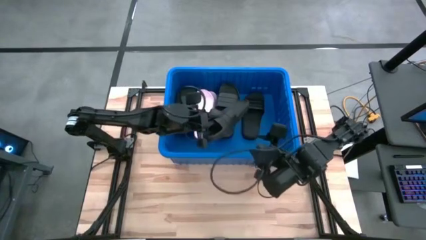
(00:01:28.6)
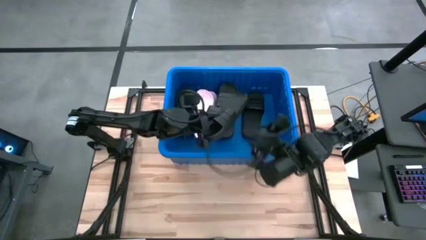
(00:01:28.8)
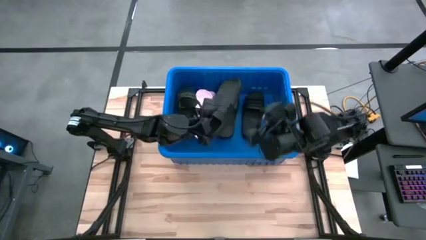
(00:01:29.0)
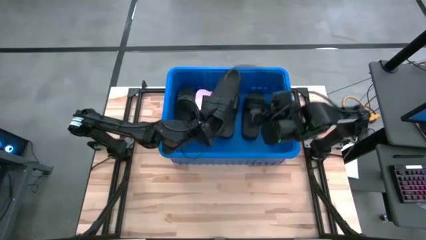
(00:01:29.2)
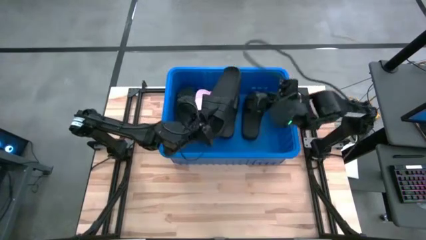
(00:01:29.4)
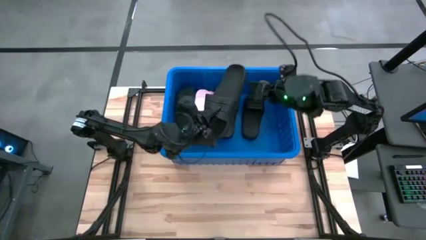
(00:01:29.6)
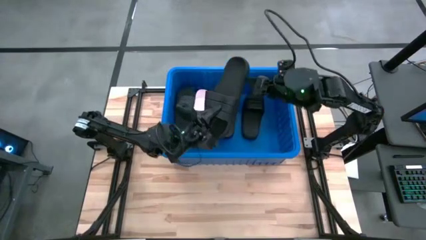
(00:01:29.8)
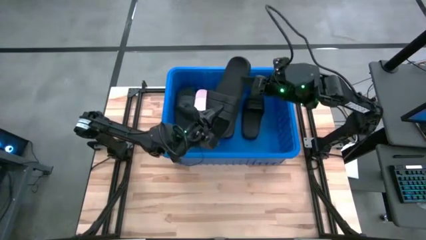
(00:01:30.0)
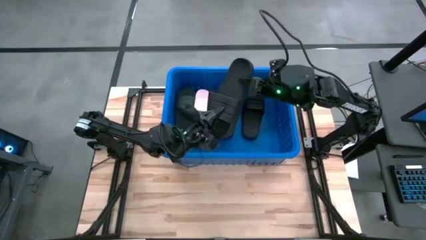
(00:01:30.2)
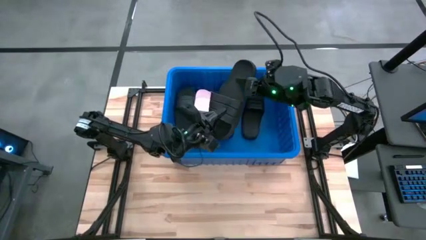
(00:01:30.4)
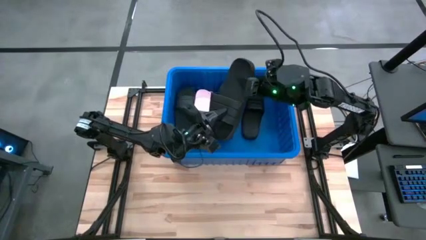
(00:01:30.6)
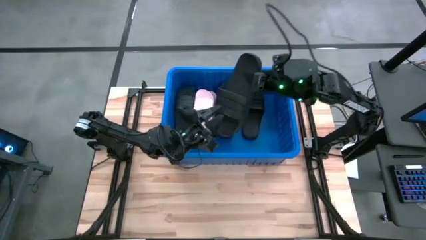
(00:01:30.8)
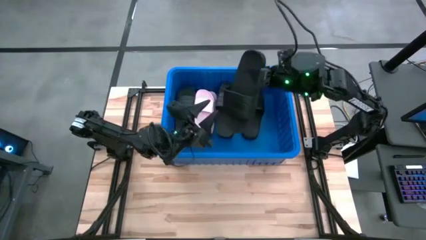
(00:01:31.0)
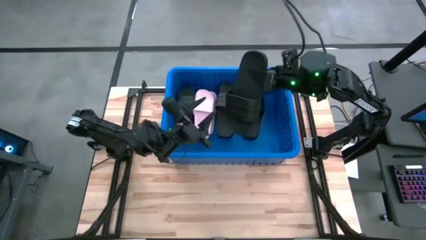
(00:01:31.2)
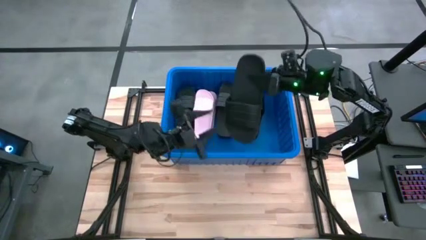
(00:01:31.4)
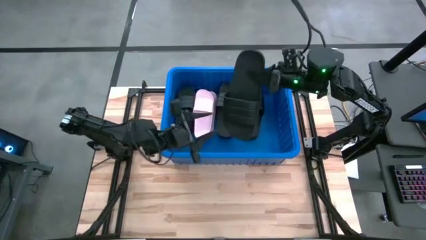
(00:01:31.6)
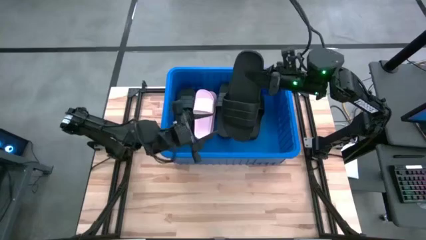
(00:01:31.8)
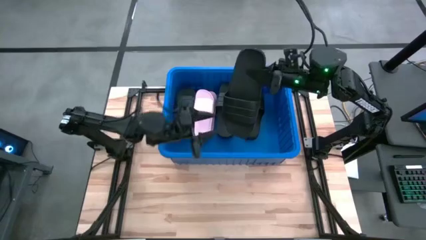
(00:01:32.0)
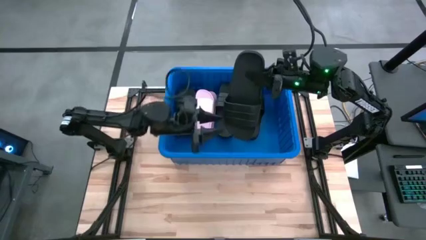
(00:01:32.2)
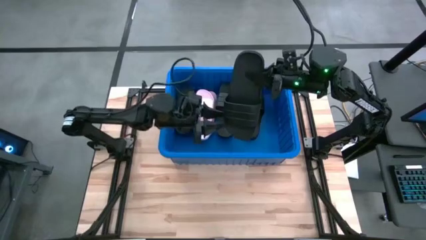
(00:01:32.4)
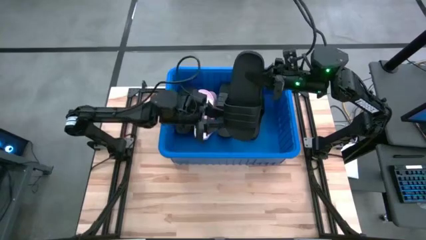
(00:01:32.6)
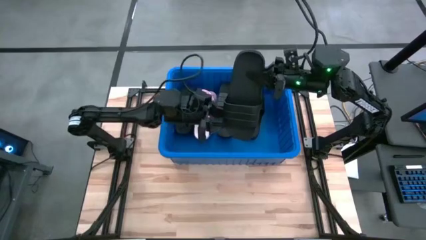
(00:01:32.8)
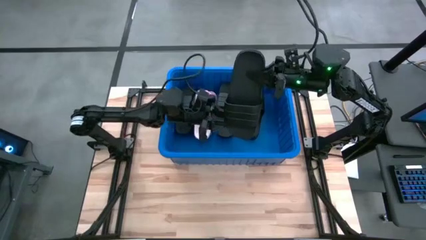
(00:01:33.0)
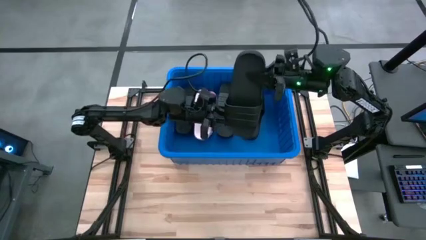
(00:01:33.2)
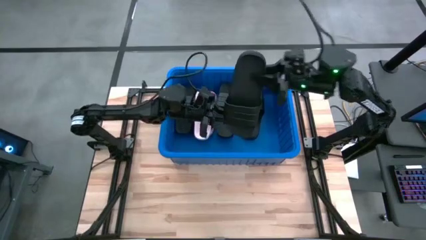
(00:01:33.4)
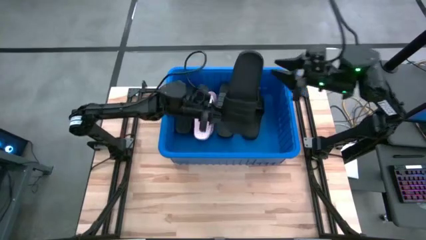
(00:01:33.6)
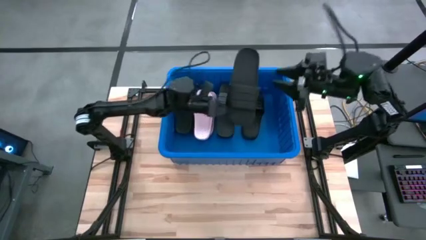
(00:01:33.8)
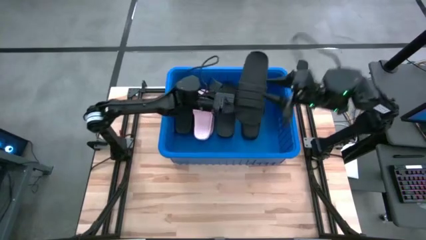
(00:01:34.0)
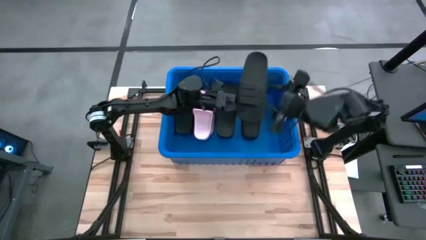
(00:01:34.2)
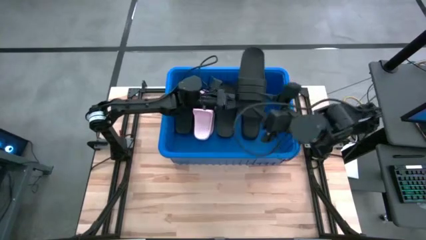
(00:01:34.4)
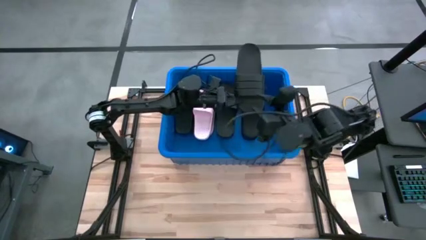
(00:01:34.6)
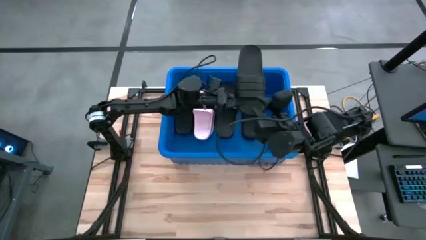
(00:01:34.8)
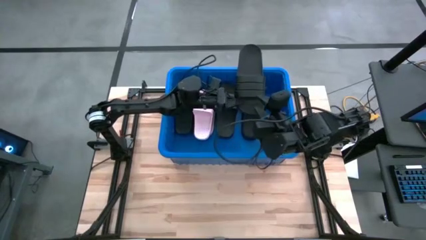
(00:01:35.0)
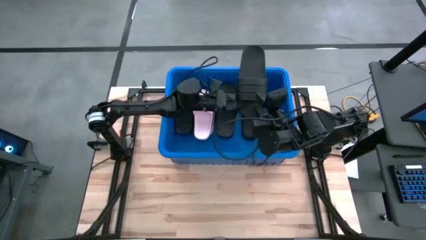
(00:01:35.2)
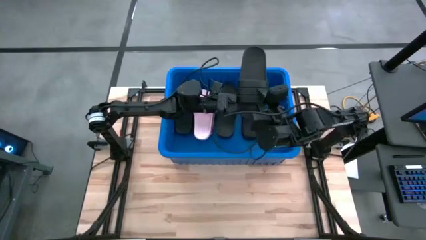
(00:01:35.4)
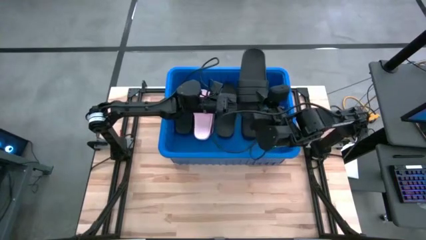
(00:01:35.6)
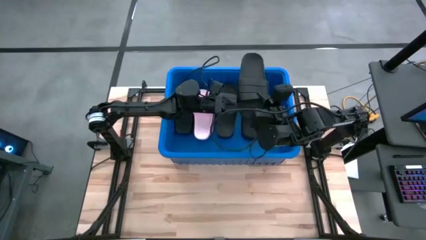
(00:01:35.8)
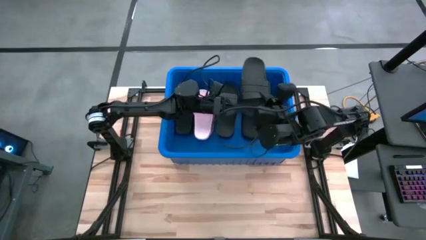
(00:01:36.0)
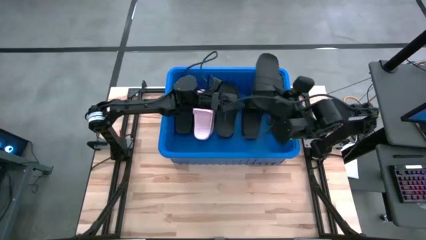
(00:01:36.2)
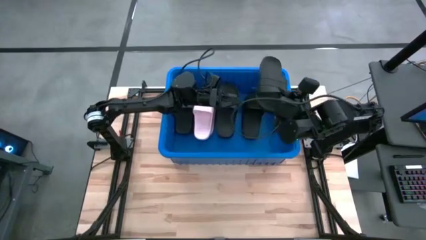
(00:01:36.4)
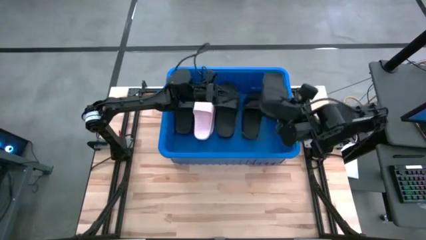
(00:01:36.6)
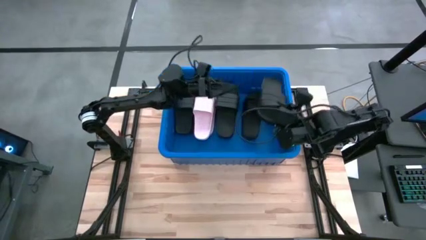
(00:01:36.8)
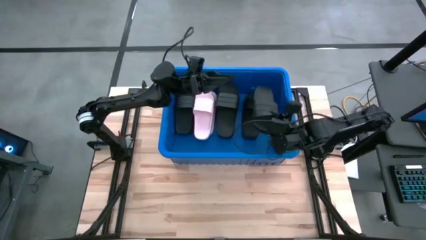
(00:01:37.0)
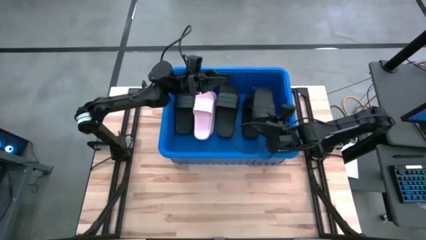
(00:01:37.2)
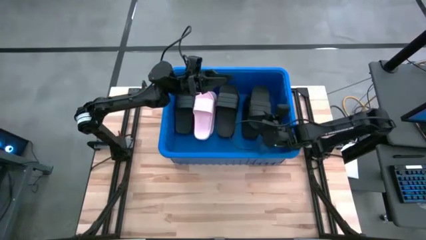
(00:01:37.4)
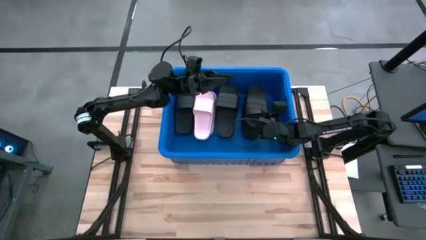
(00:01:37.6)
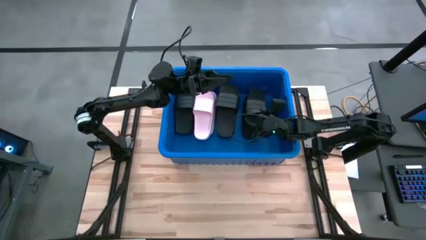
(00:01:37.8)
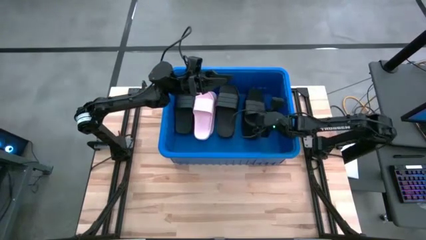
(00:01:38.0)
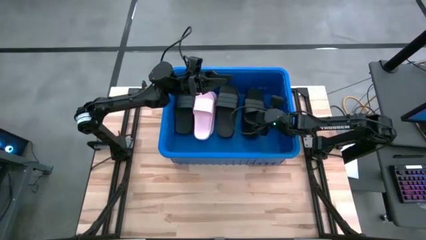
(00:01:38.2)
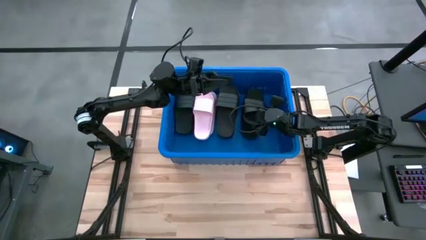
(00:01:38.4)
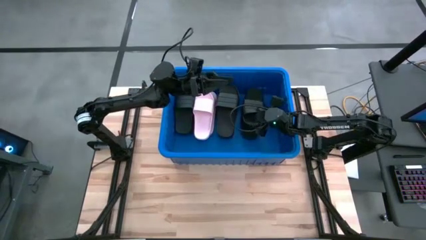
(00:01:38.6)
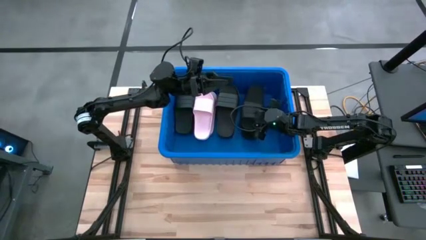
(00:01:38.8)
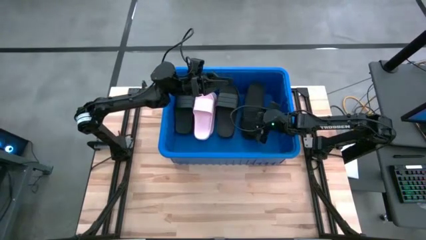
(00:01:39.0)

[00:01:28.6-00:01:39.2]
Task: Pick and place slides into bin
Put the black slide into the blue container
